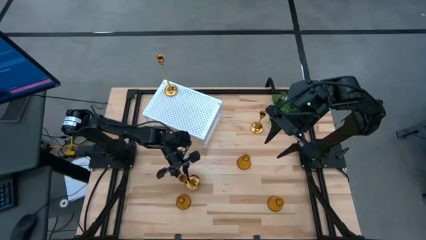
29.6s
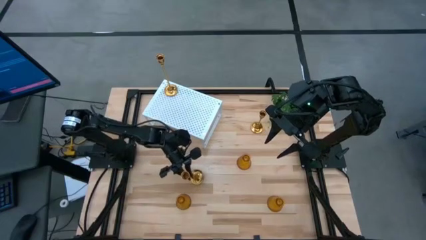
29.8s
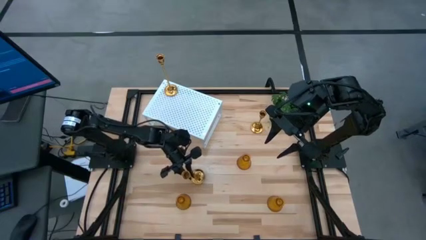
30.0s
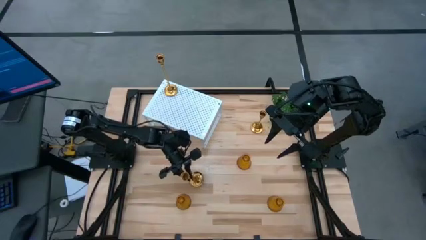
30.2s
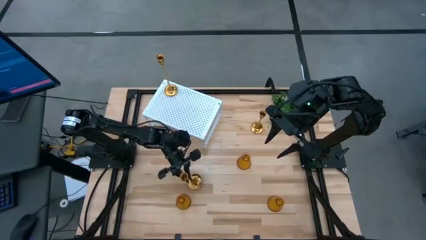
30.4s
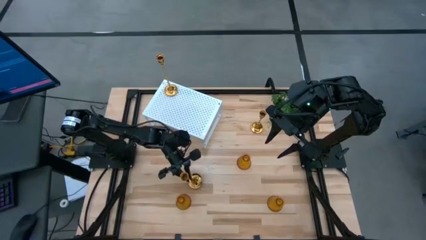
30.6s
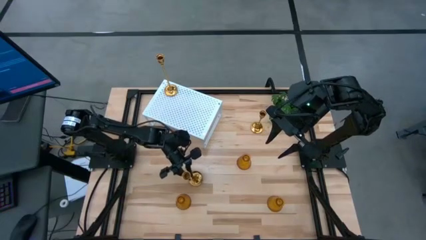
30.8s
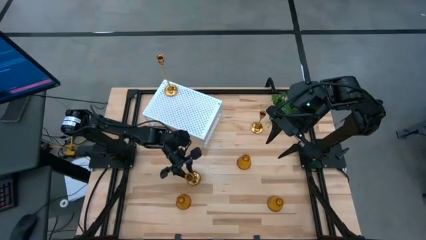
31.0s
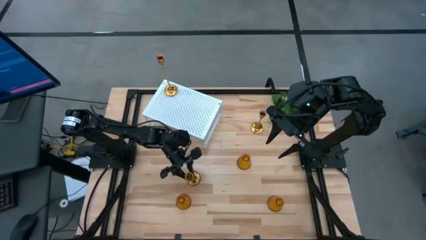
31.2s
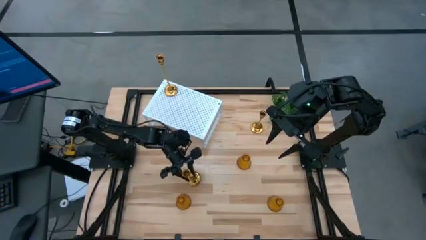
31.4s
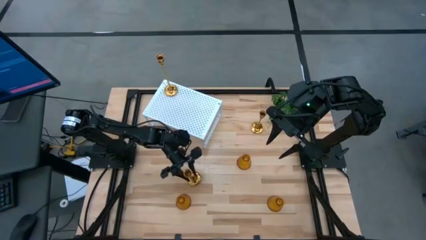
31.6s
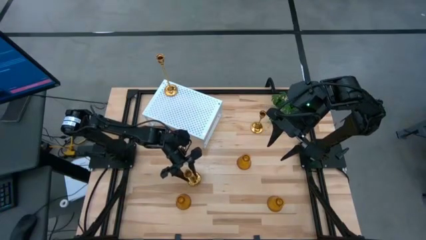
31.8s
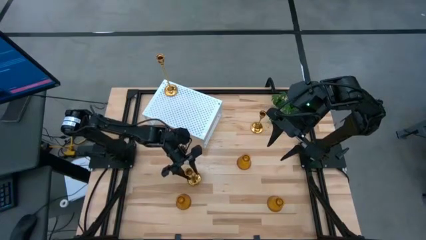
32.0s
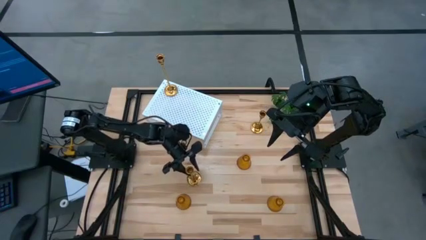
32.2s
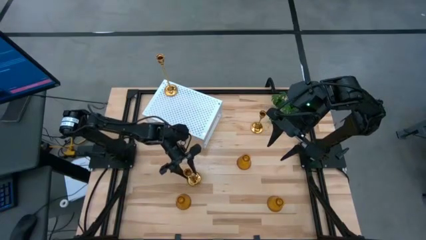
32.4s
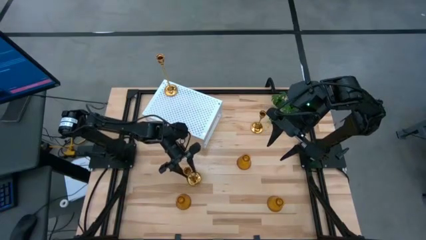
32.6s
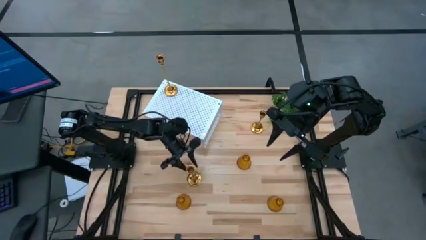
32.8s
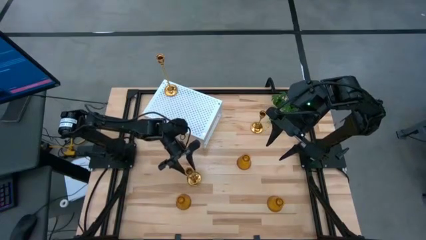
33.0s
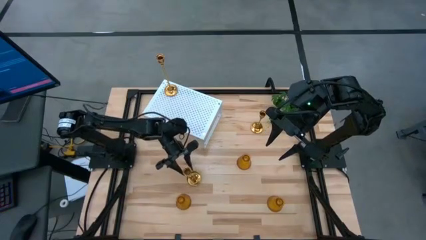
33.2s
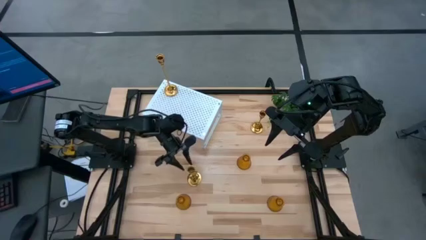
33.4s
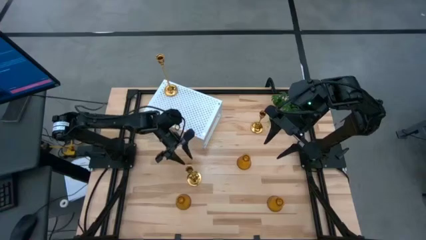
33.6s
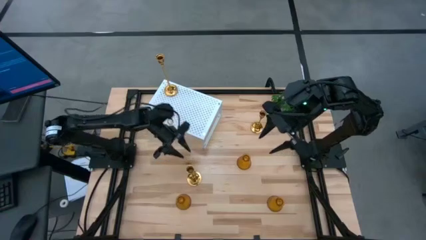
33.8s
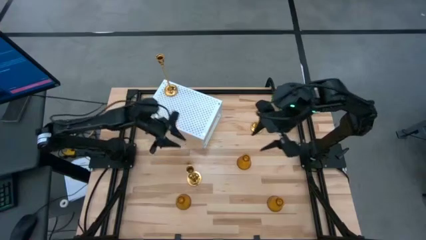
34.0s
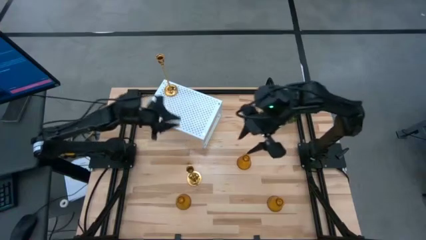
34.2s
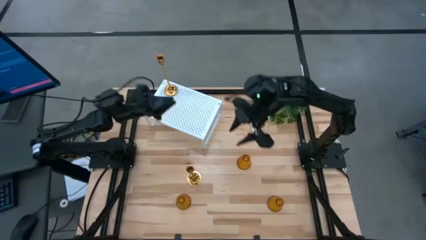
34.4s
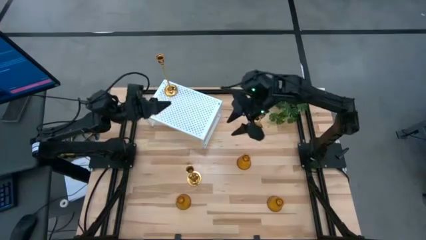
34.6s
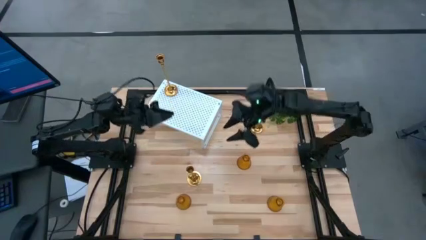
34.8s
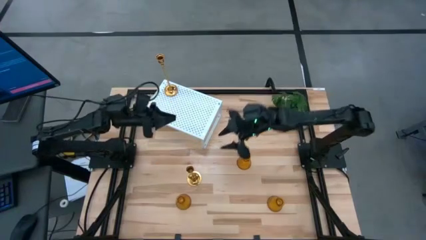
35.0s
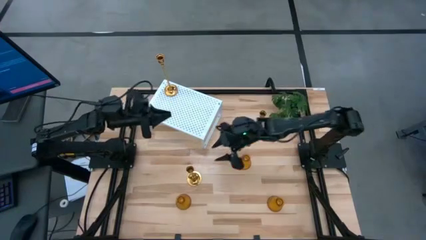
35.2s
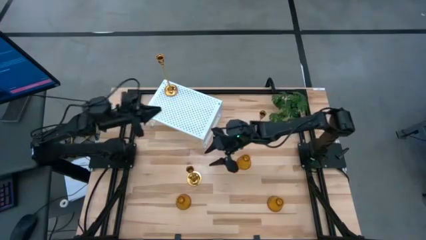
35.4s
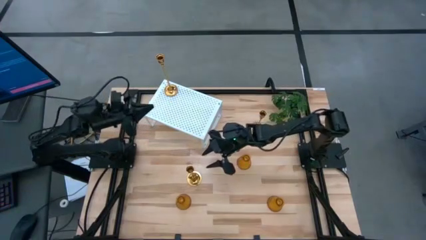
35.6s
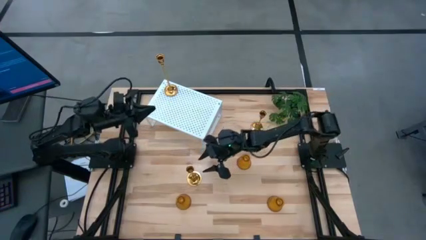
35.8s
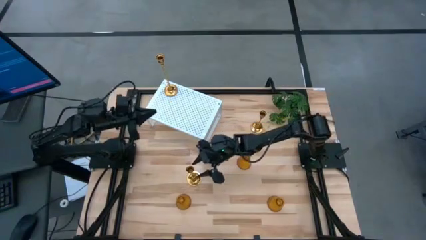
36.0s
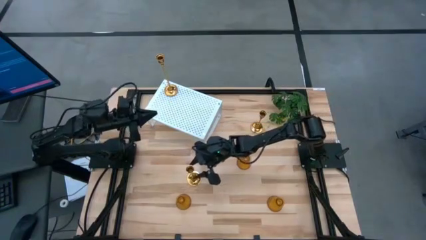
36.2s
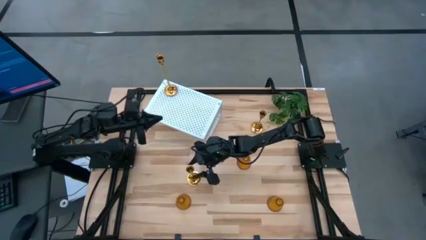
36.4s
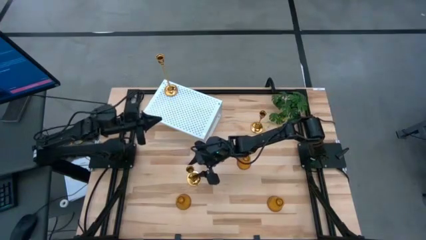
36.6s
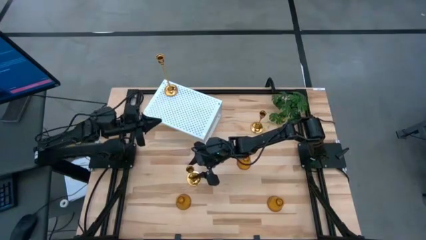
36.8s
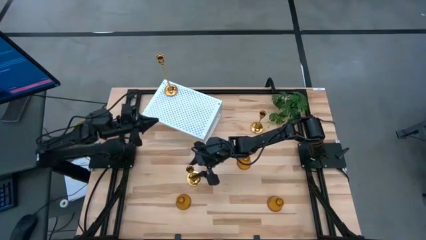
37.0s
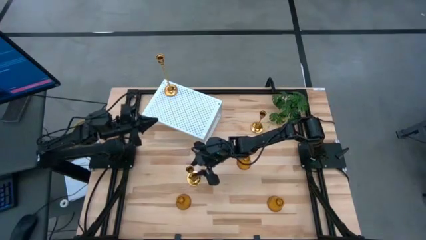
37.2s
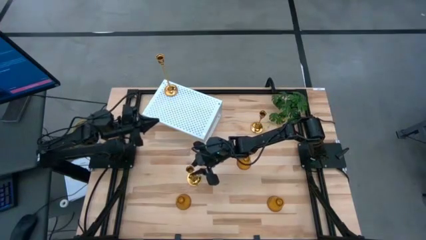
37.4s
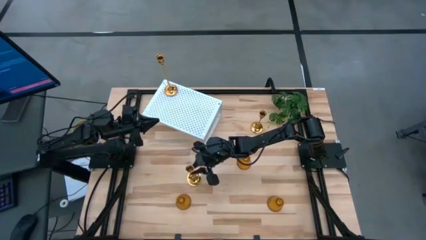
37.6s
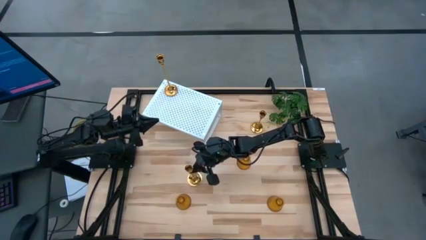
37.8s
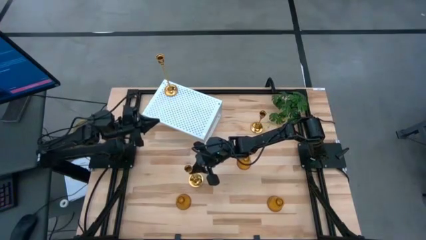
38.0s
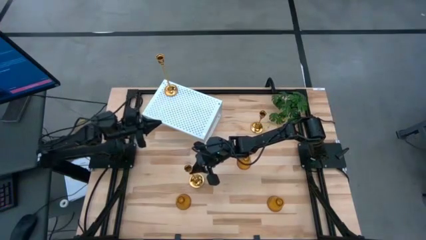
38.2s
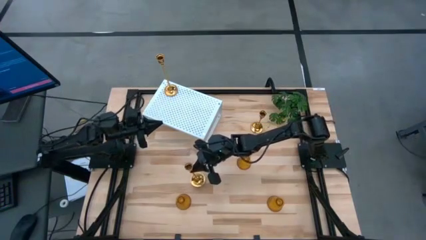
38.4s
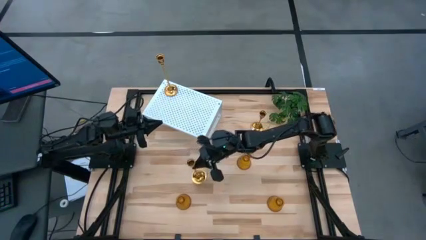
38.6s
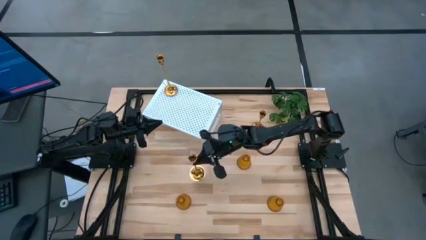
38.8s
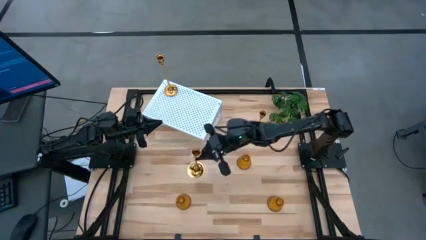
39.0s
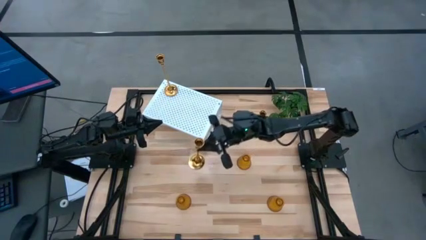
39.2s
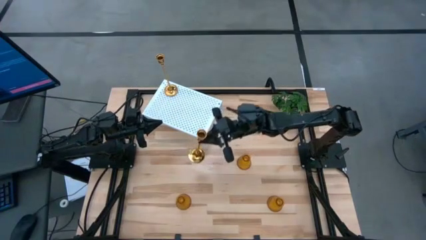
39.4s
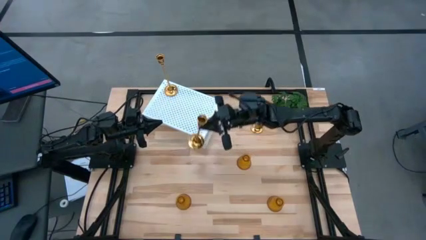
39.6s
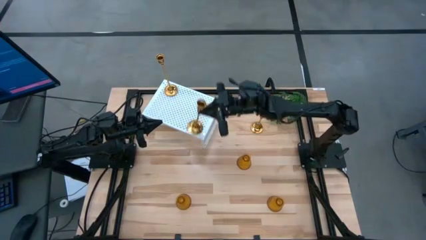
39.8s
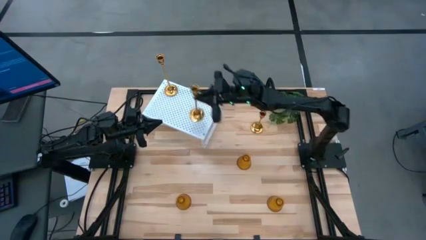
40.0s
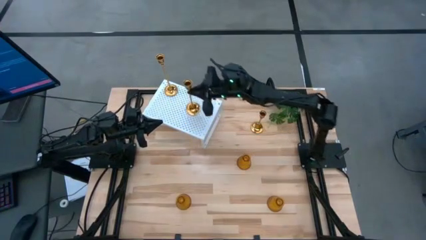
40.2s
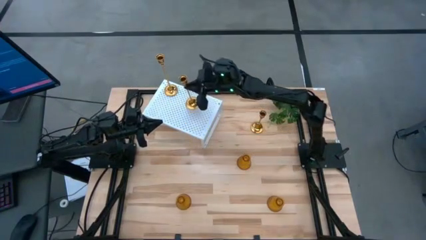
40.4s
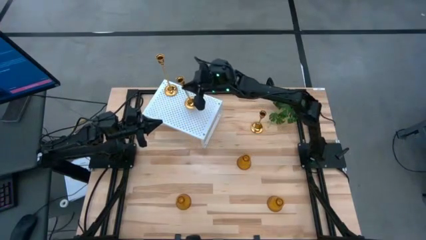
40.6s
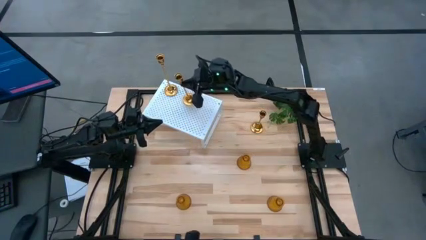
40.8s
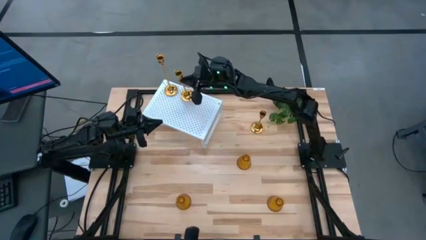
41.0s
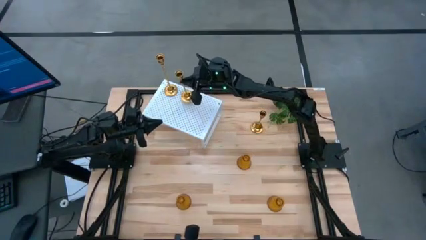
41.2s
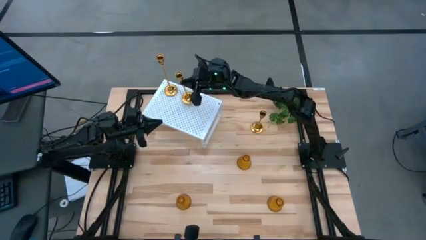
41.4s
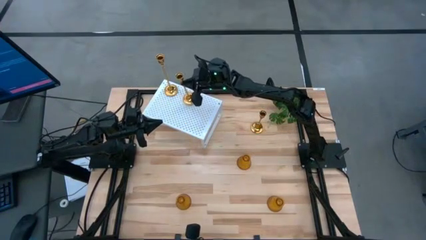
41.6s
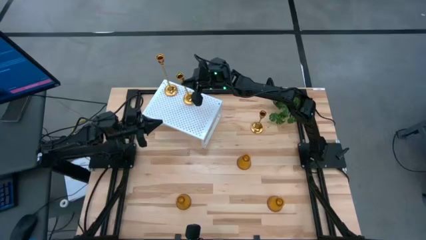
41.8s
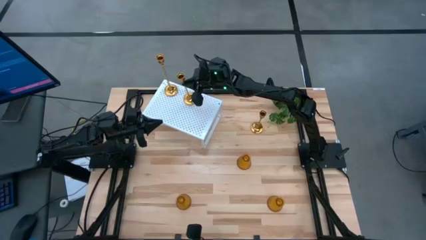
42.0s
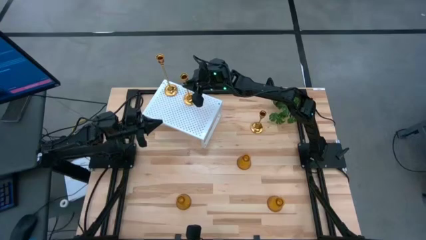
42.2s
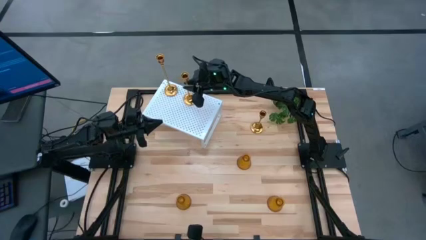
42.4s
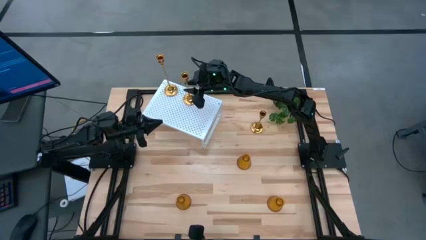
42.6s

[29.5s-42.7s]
Task: Pick & Place candle stick holders
Put the bottom gold candle holder on the shelf aligned with the other gold candle holder

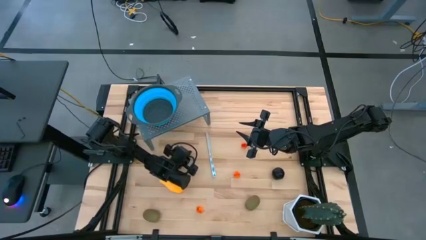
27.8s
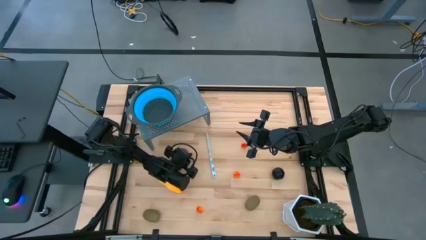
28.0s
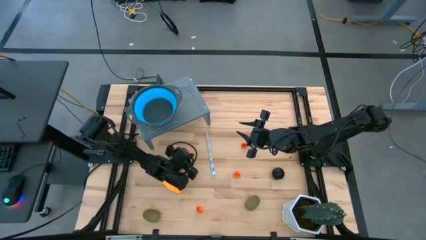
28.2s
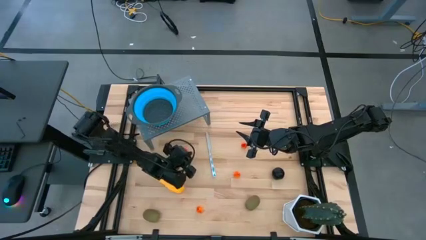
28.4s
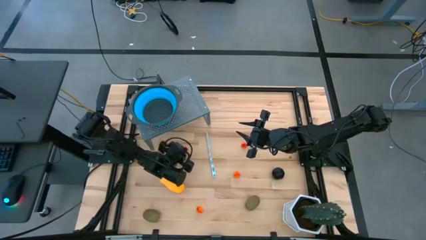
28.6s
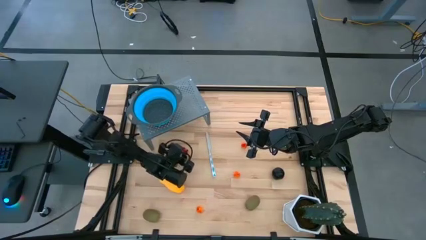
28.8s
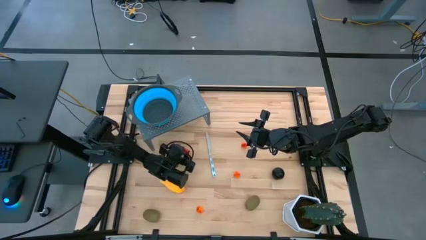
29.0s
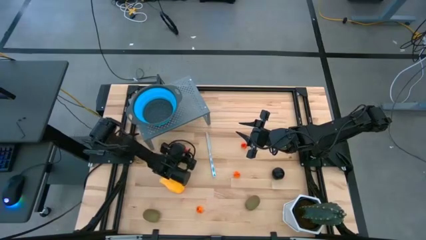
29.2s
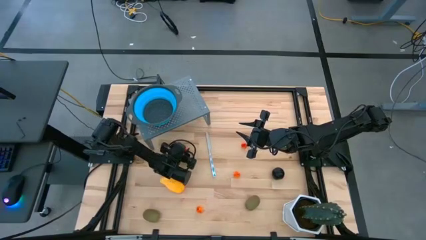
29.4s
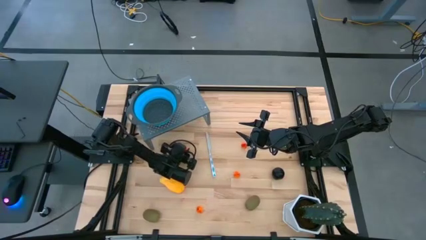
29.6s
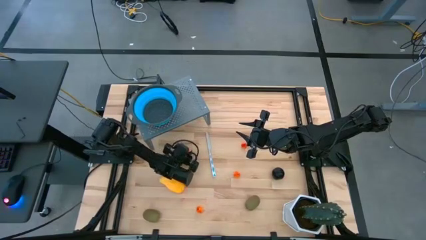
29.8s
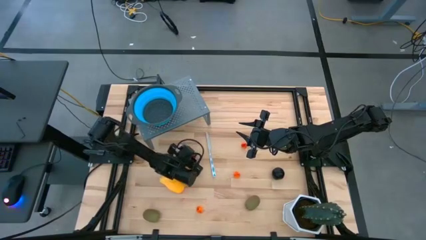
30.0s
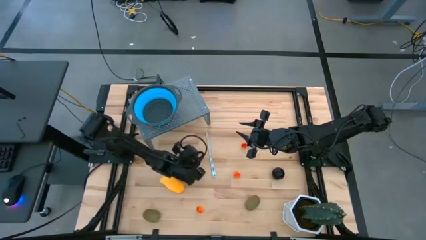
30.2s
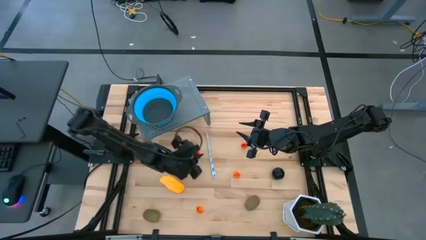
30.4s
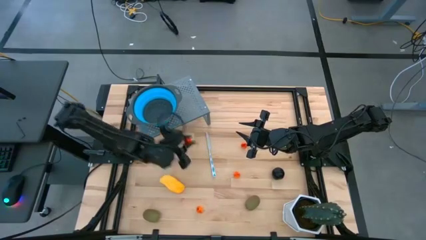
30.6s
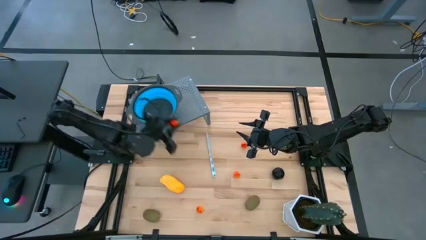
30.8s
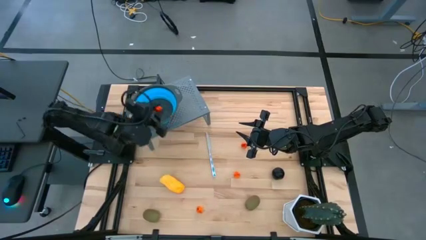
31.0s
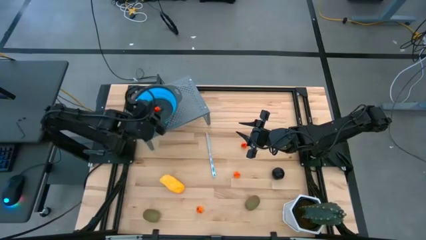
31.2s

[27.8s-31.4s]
Task: Pick & Place Fruit
Put the orange peach into the blue strainer bowl on the shelf
